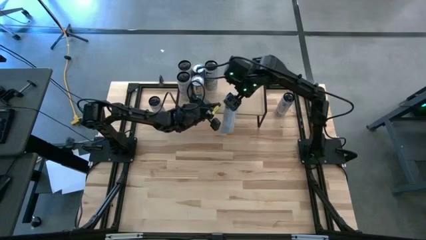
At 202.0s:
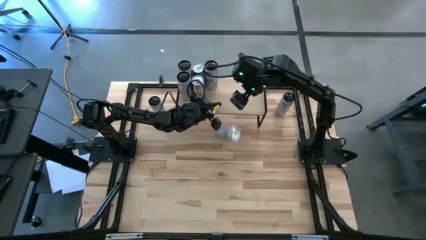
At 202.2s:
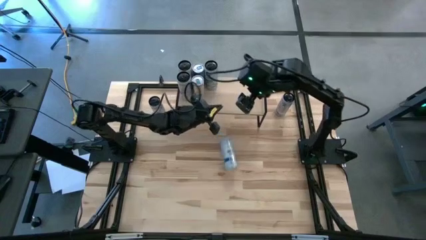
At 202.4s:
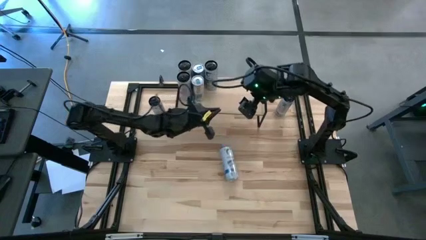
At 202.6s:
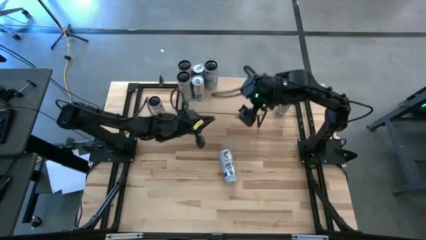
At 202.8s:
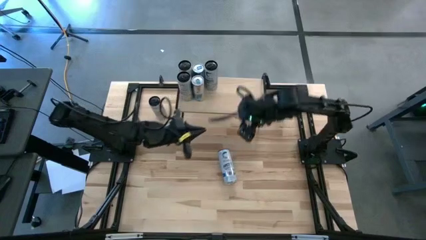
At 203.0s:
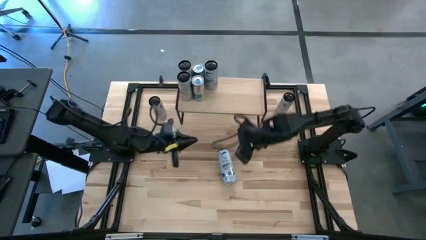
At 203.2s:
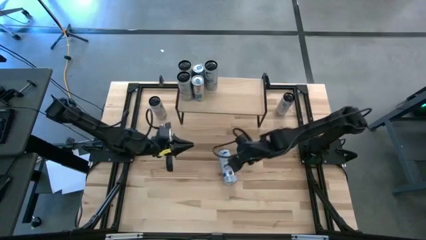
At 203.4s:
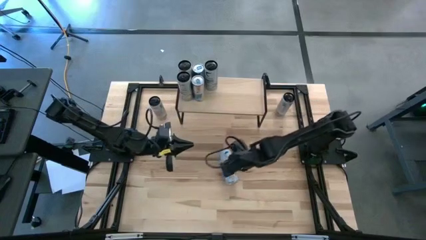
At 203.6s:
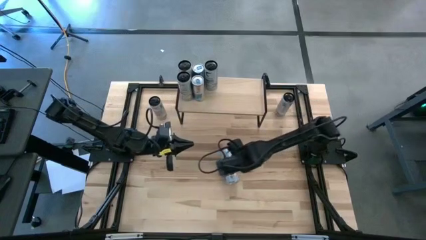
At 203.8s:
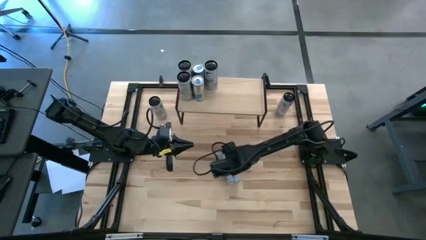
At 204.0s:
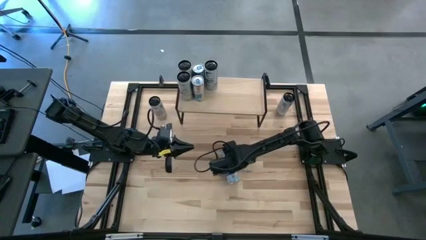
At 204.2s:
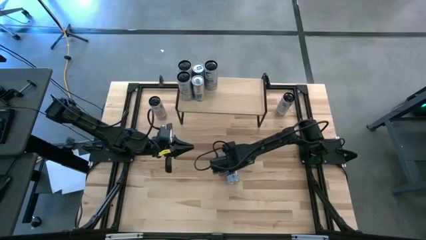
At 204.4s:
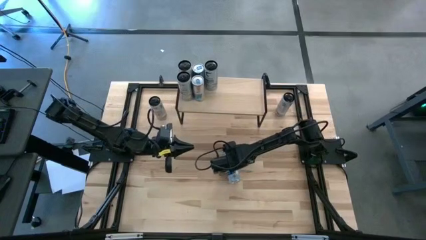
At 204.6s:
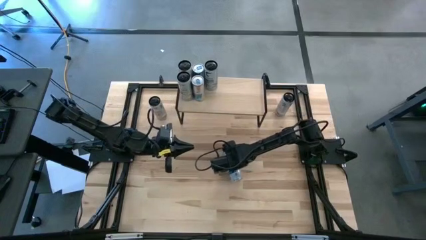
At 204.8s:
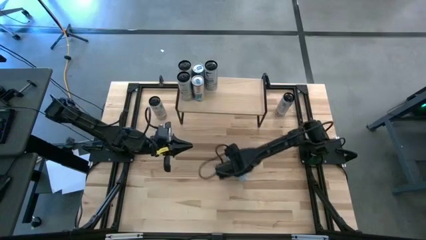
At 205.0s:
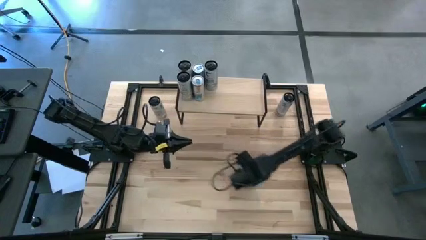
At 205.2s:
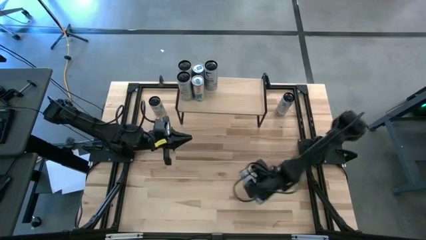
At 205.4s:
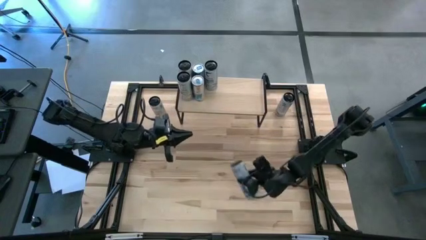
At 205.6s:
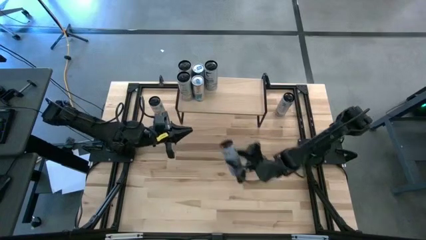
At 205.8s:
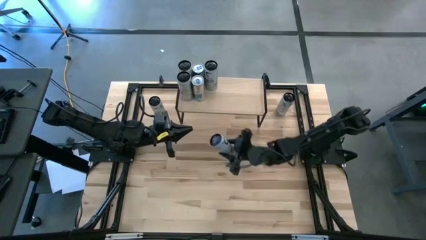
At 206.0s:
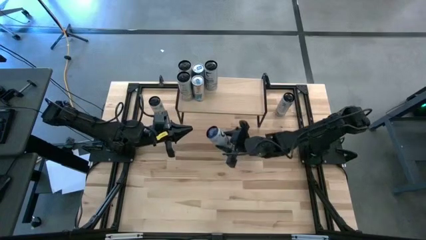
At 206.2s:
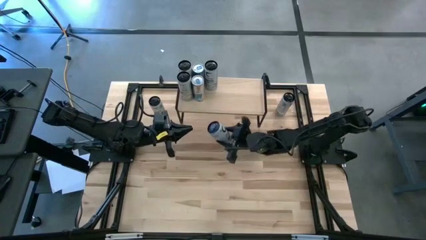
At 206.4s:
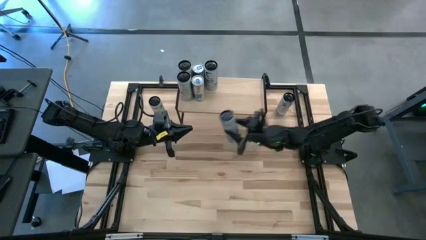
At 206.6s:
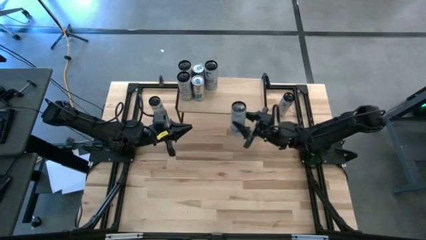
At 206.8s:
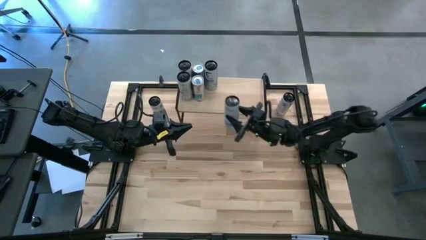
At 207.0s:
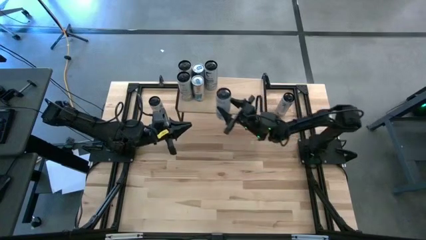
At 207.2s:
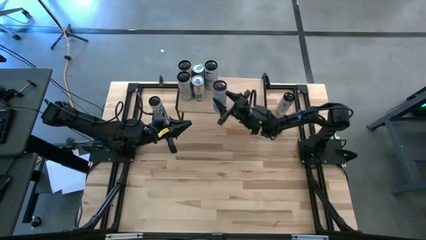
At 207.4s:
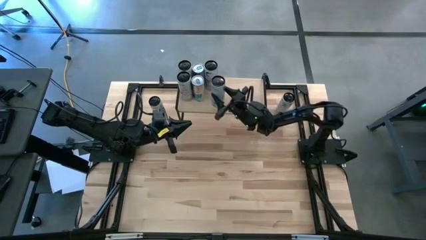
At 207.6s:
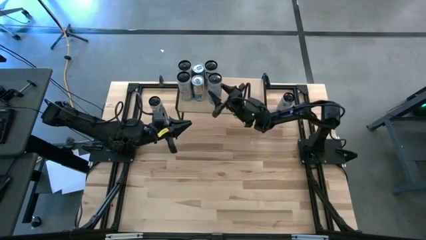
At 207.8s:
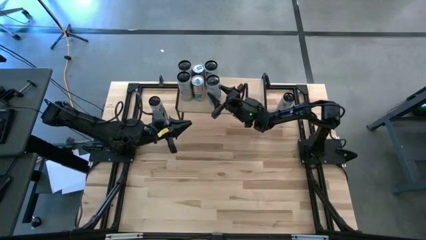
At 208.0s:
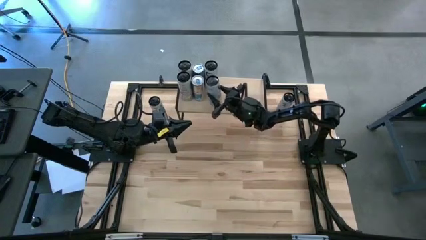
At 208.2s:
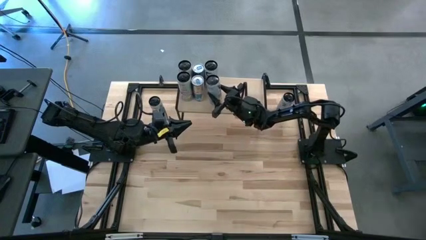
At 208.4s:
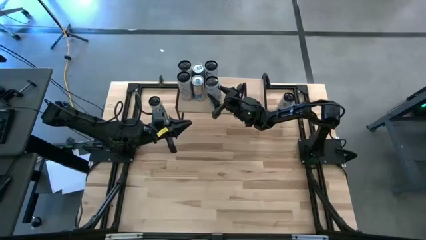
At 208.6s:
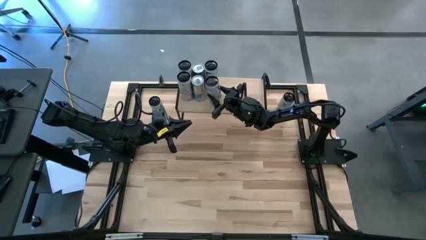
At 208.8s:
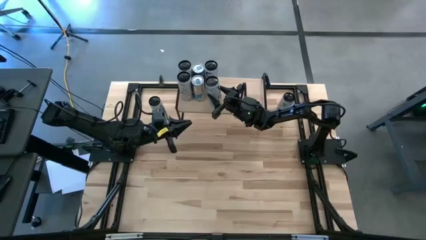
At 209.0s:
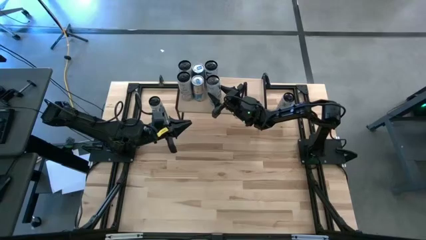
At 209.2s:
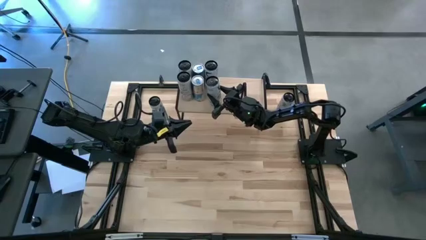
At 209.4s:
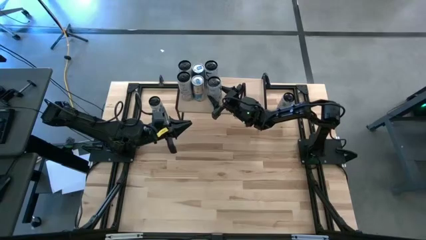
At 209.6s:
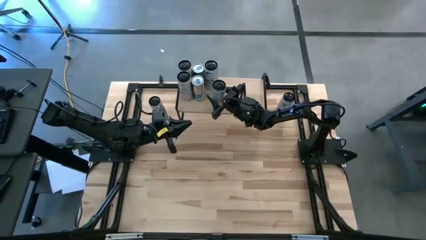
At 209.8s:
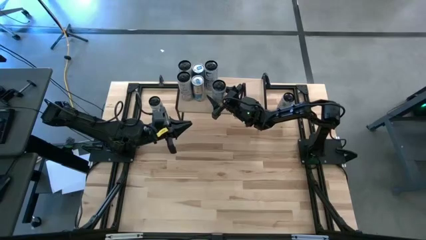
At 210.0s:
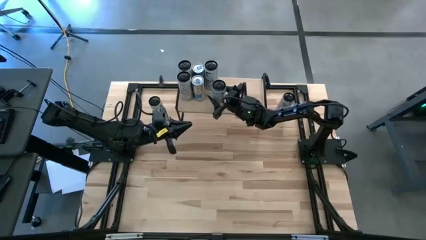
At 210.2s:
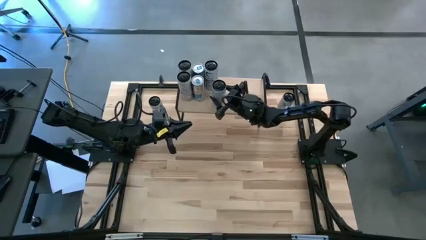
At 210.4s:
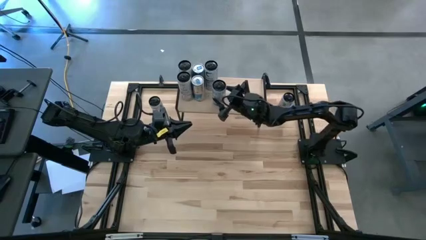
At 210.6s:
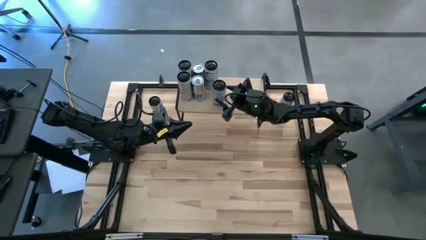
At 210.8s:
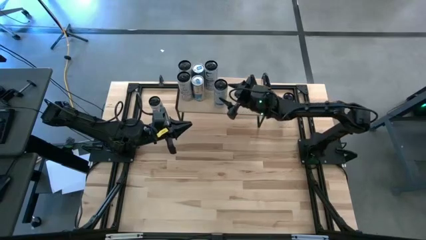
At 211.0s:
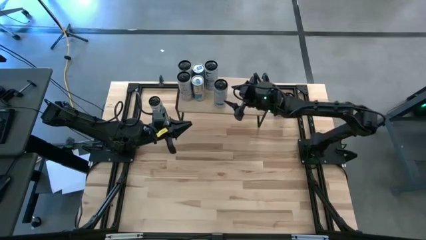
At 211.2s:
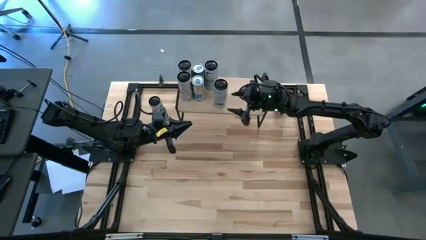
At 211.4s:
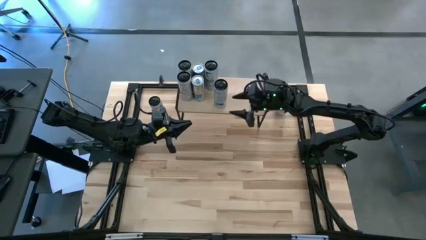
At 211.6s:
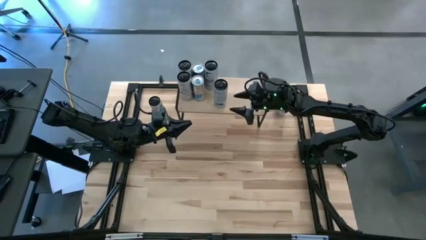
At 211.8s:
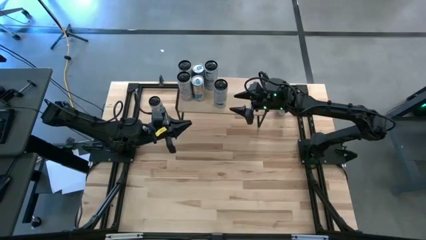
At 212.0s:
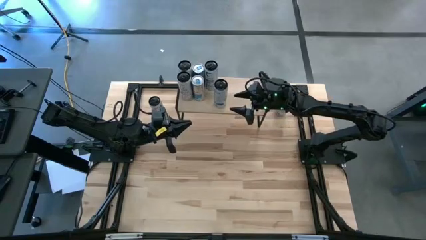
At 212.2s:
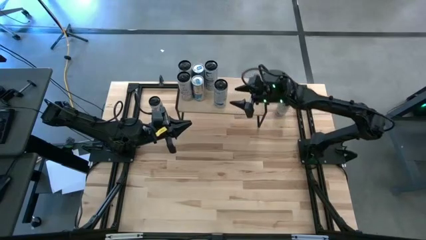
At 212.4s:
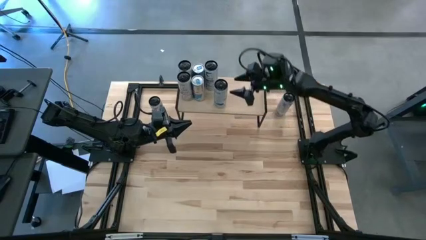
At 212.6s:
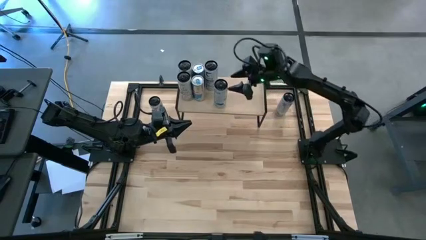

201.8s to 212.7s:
Task: Place canned beverage on shelf
Put the bottom right black soda can on the shelf
